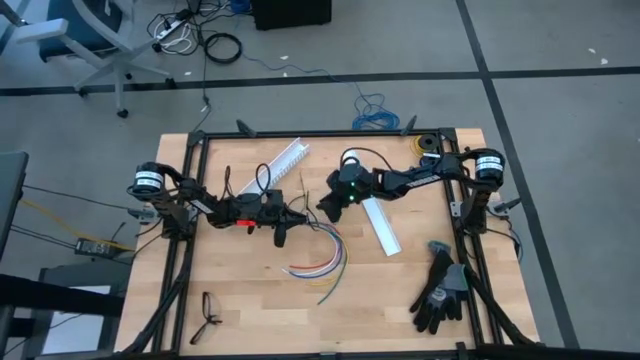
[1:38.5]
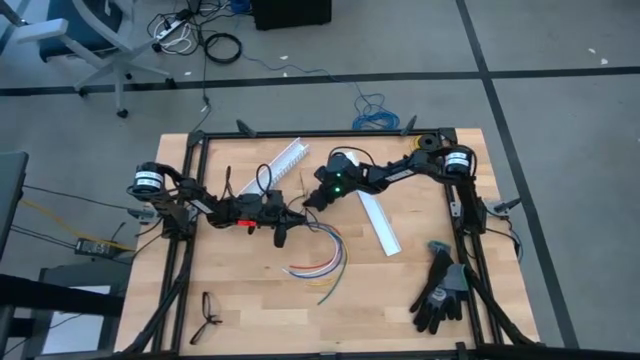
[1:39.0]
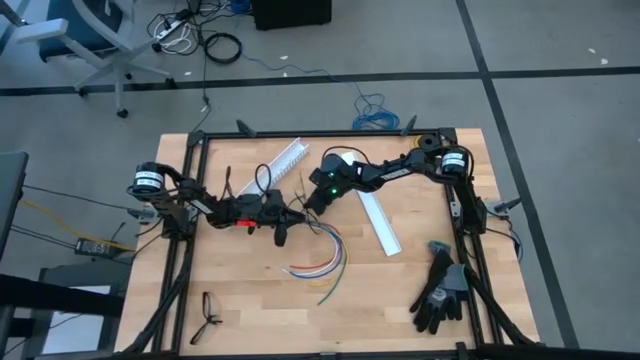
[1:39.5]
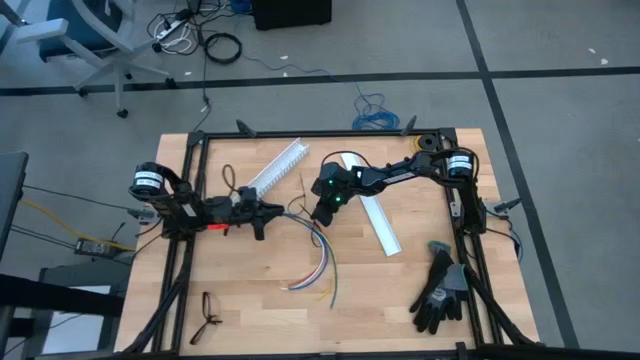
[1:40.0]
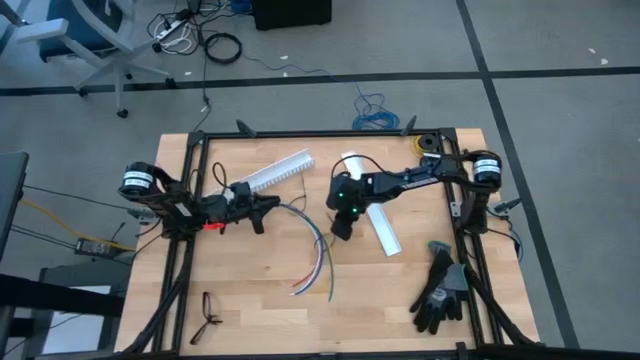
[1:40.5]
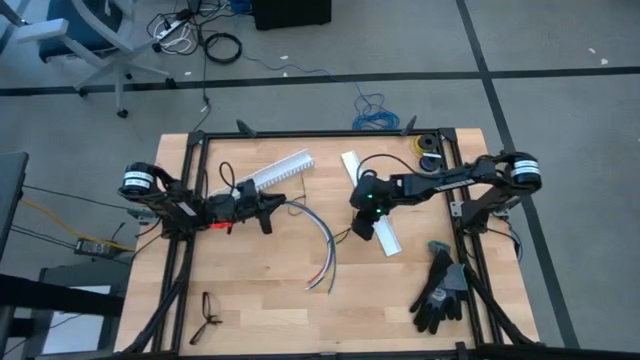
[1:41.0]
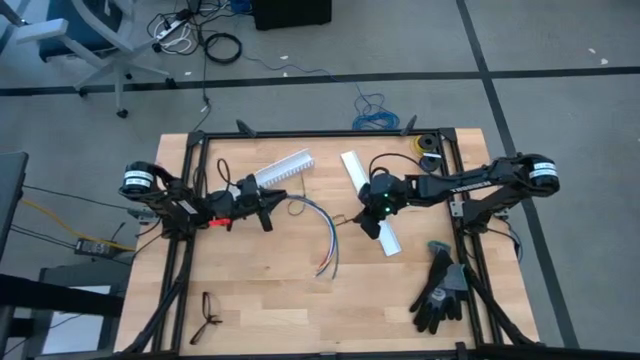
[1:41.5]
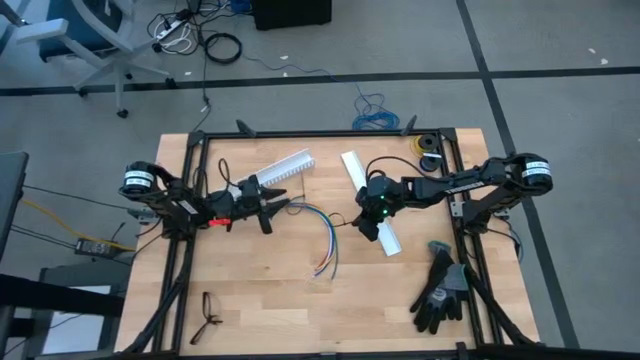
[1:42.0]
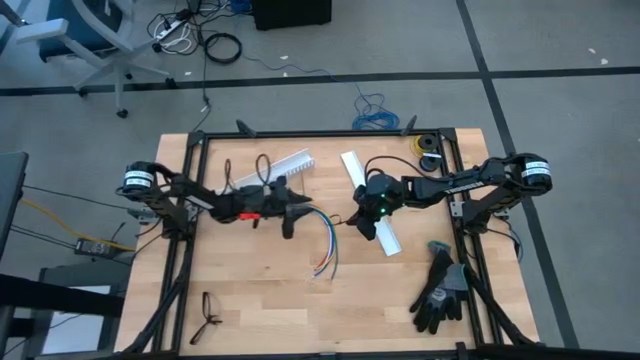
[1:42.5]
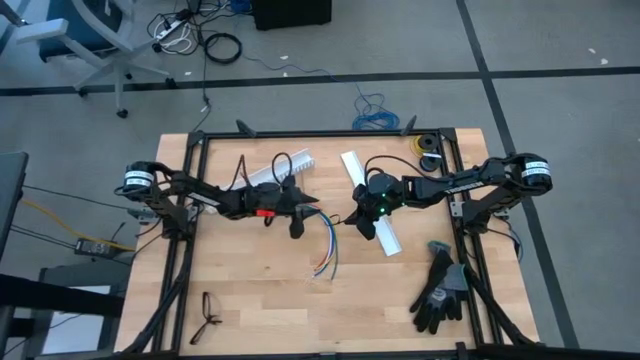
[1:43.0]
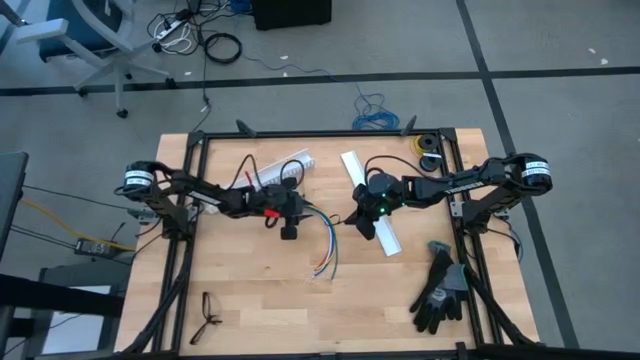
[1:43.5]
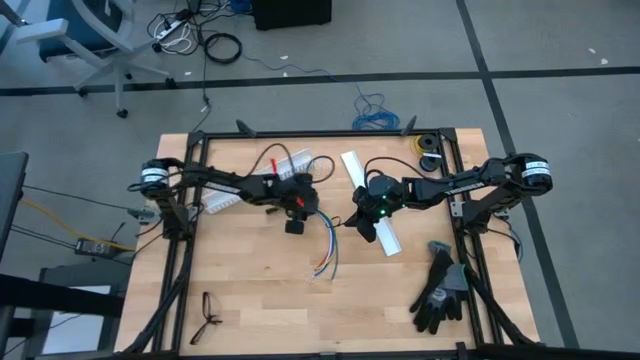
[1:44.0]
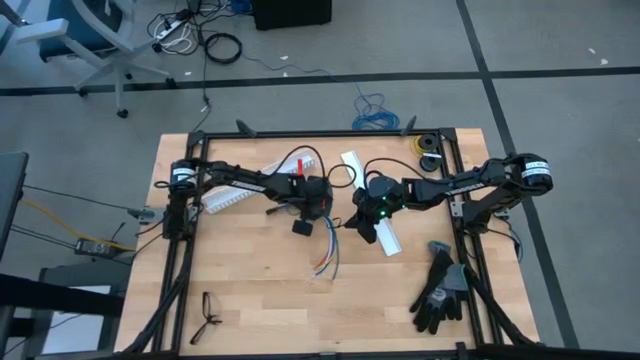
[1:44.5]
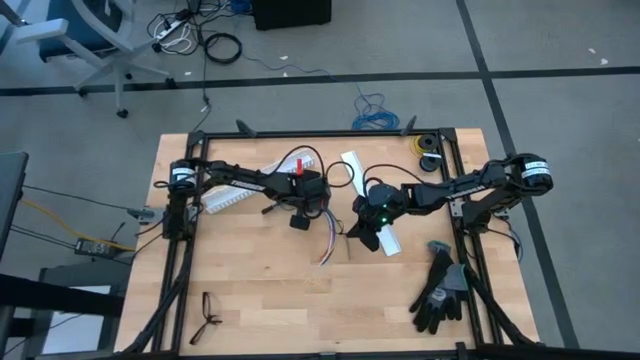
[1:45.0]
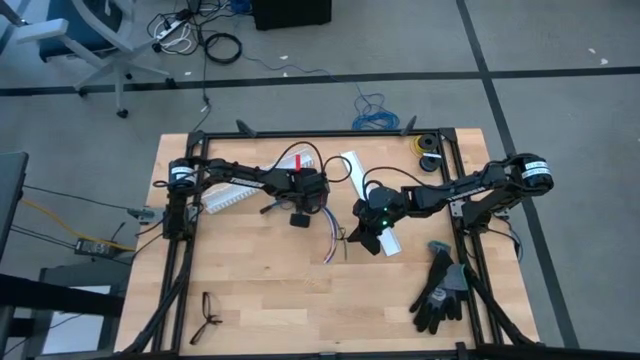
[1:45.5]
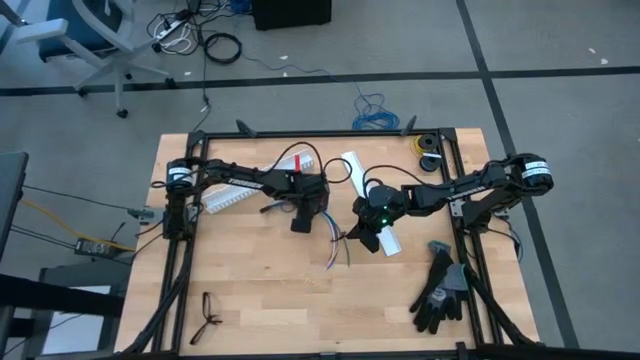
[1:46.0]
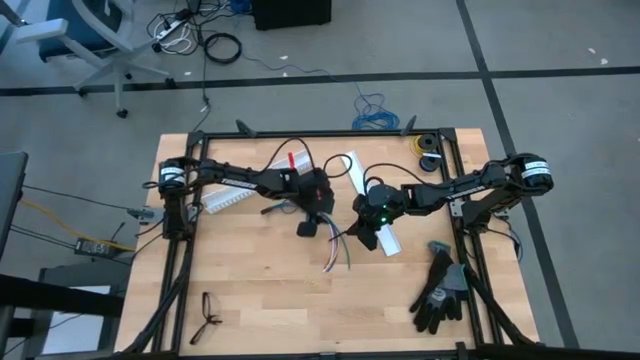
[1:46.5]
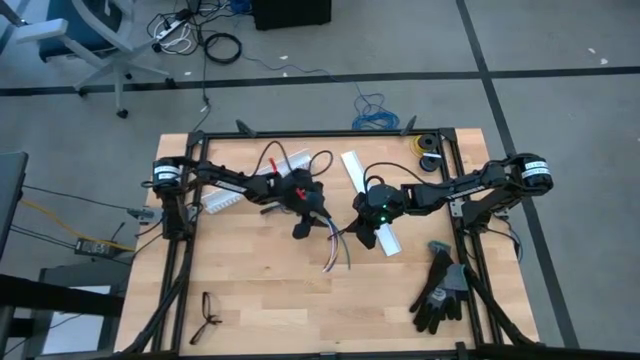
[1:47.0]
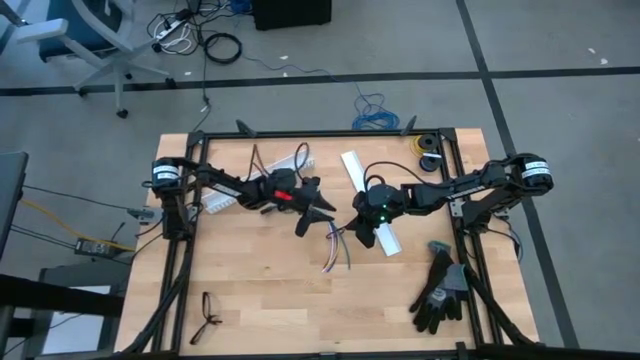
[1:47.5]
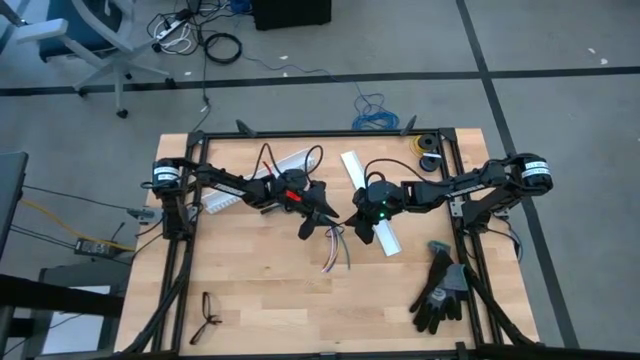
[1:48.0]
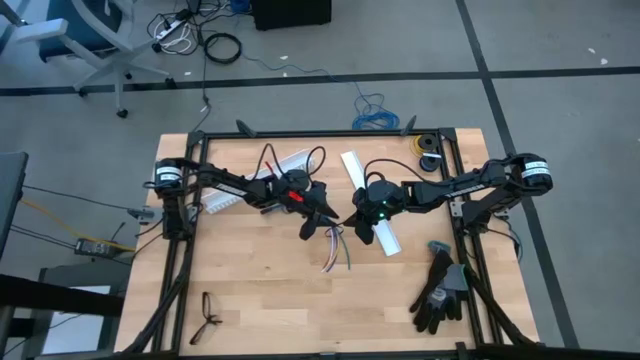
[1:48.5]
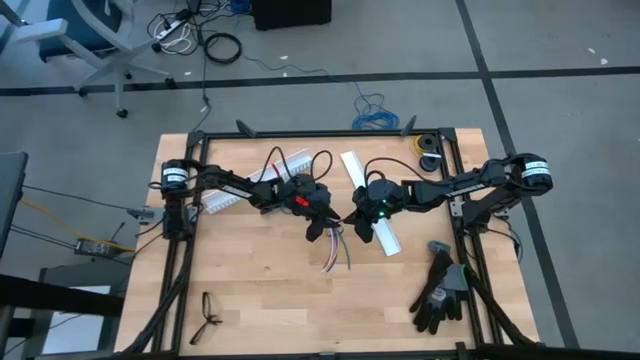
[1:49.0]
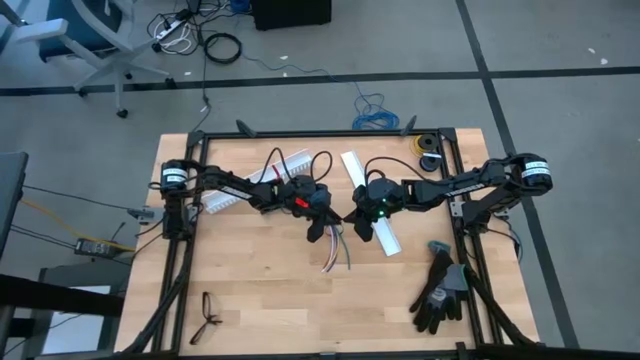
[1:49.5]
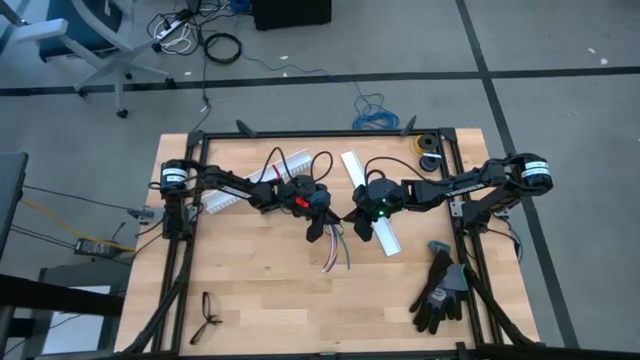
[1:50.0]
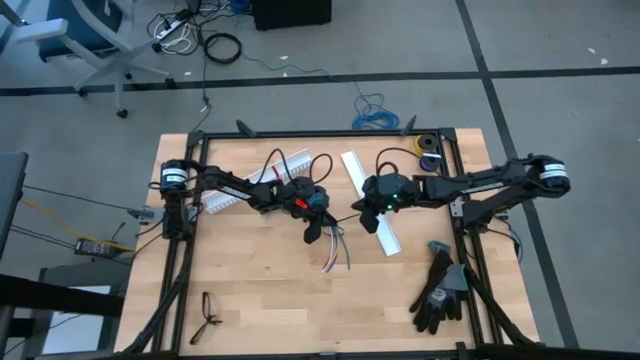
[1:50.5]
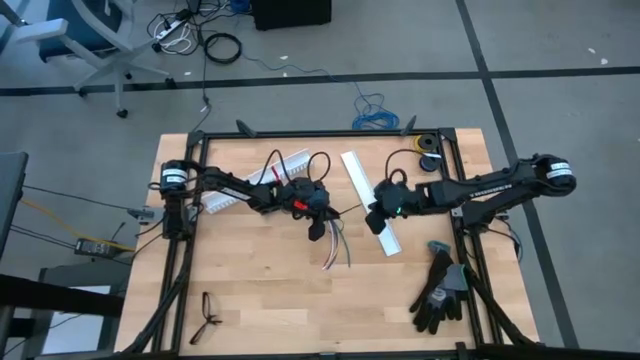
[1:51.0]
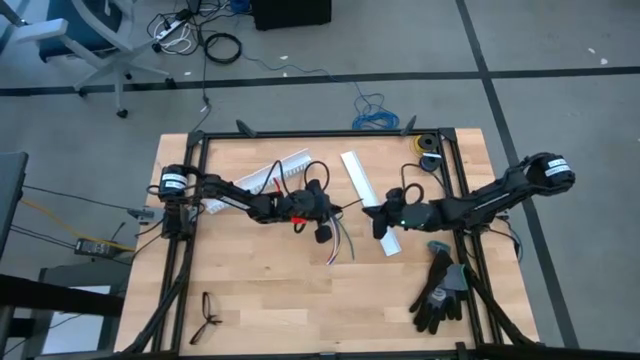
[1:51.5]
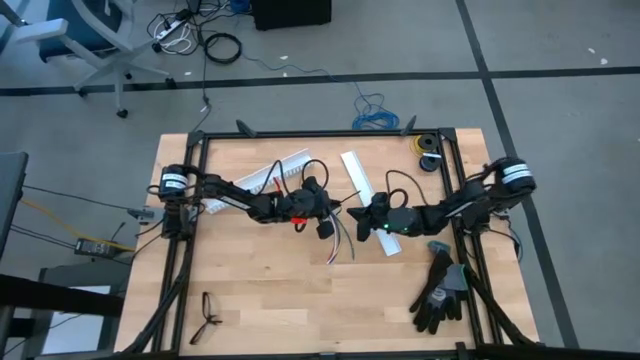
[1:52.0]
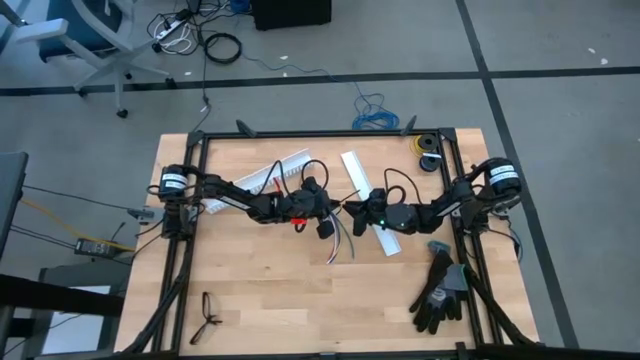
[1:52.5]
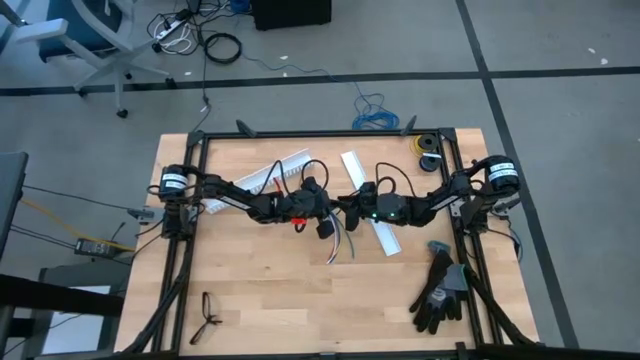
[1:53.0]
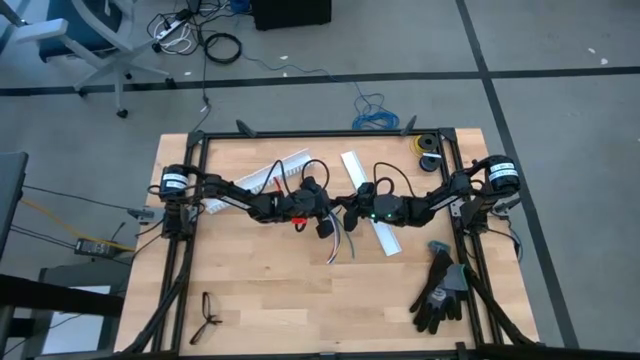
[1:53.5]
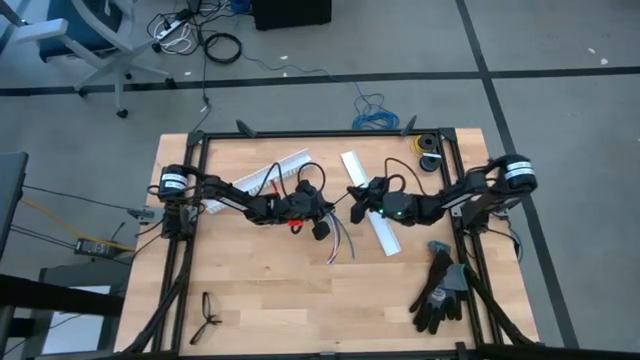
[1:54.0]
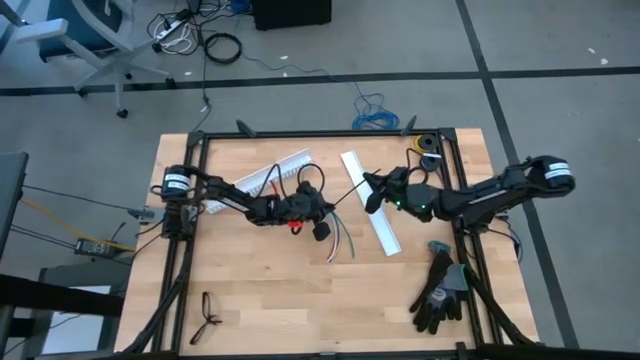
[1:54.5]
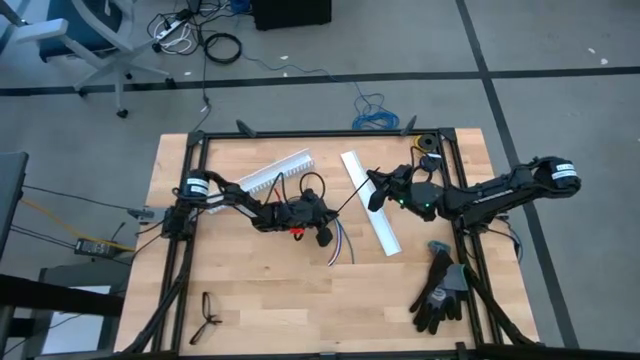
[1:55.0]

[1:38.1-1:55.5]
Task: Ziptie cables
Wrap the cable wires with the left black zip tie

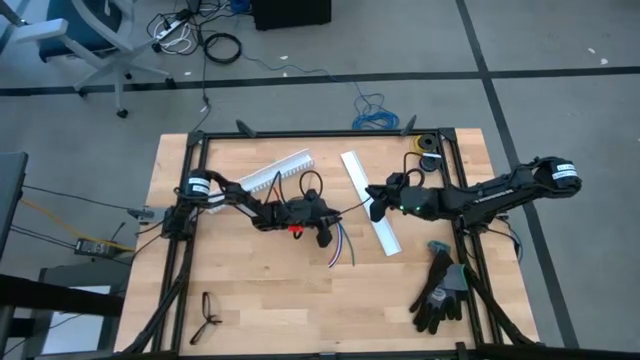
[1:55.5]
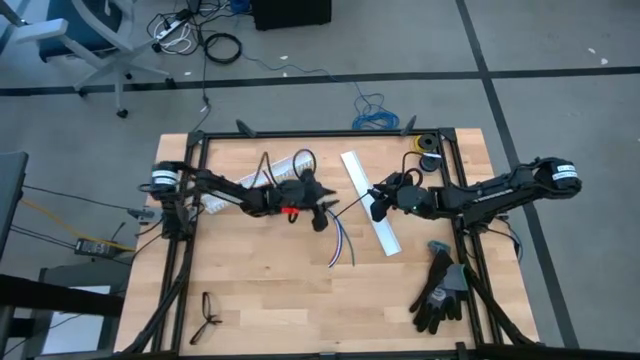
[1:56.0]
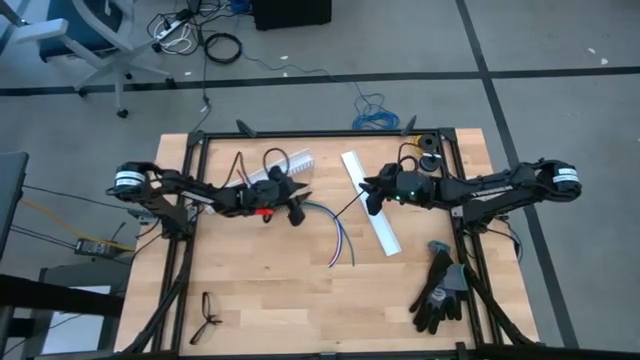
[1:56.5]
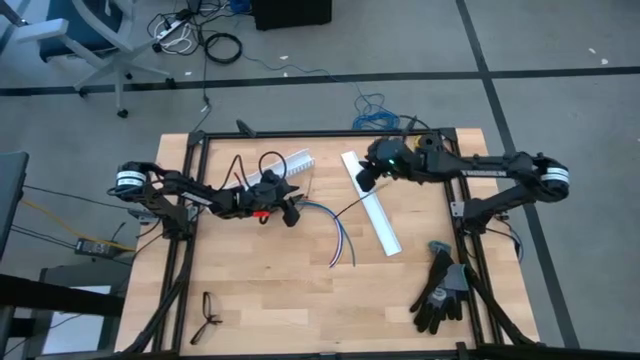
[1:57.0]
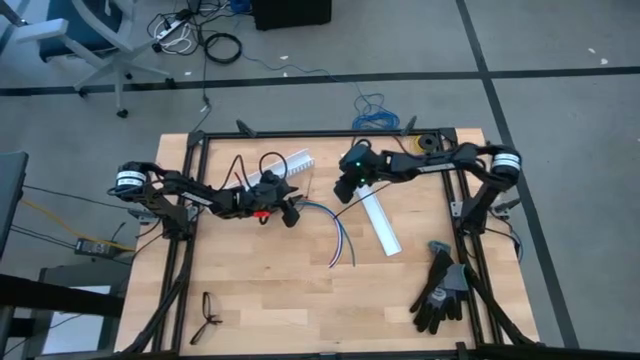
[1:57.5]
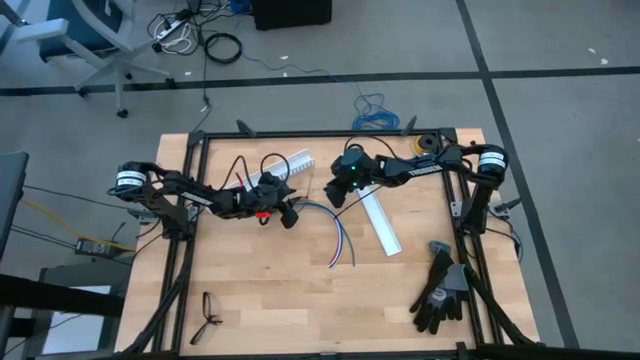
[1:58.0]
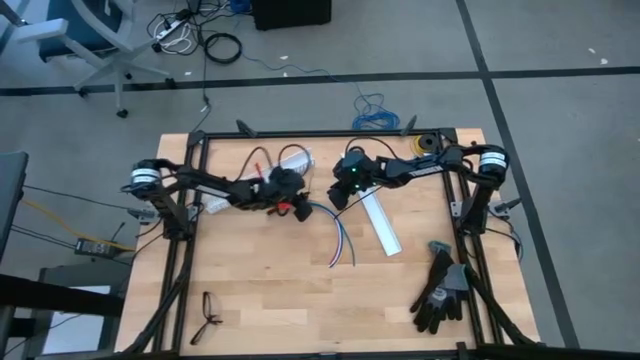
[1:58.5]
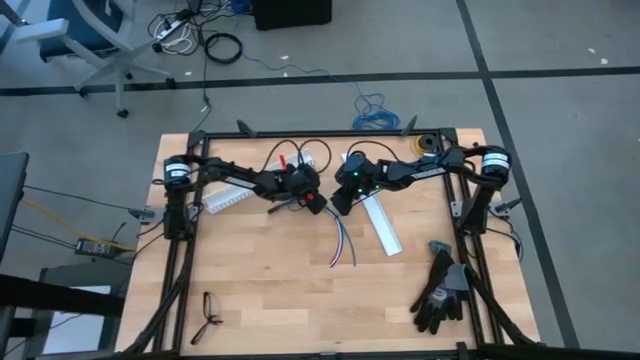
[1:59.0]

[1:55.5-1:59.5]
Wrap the cable wires with the black zip tie
